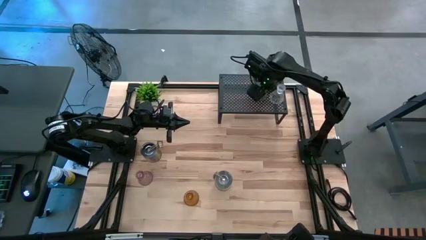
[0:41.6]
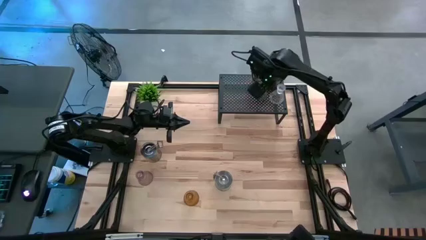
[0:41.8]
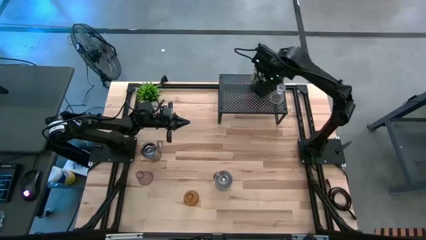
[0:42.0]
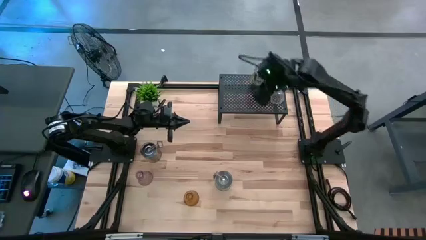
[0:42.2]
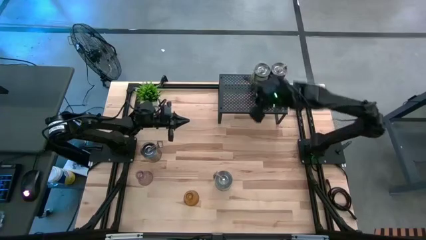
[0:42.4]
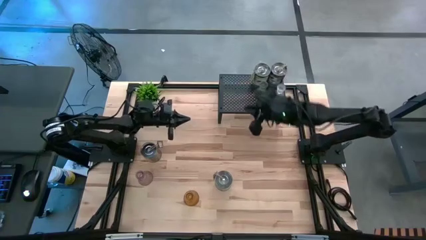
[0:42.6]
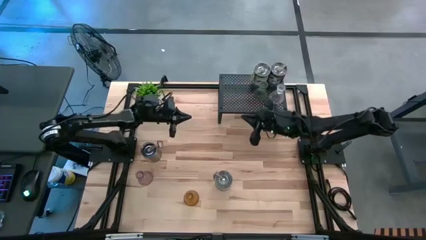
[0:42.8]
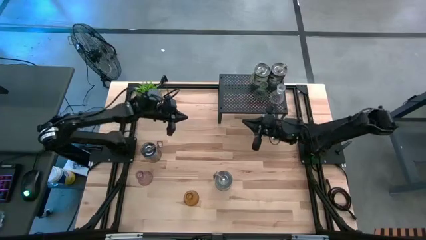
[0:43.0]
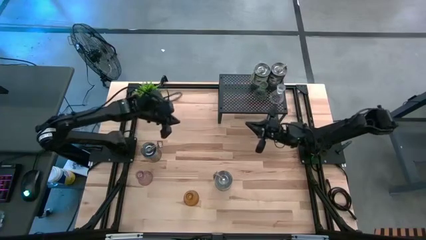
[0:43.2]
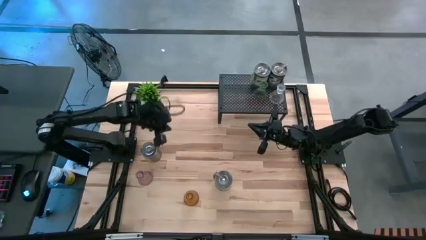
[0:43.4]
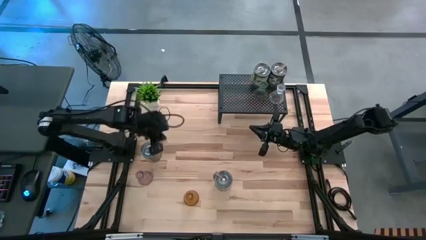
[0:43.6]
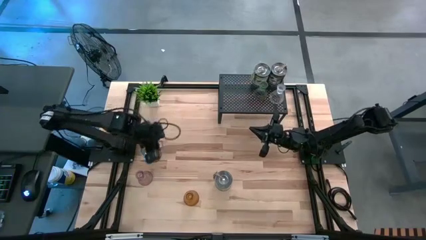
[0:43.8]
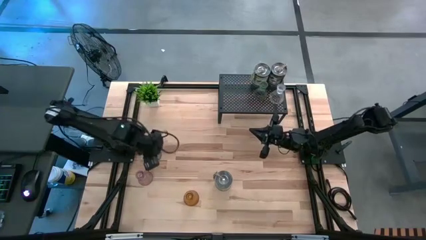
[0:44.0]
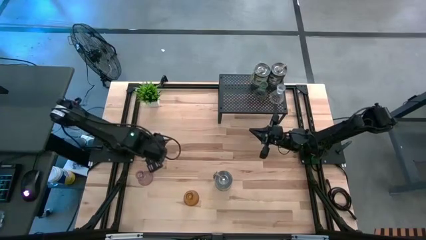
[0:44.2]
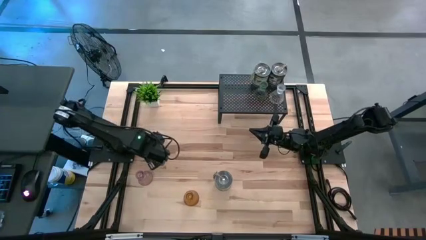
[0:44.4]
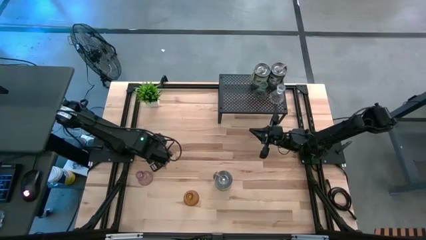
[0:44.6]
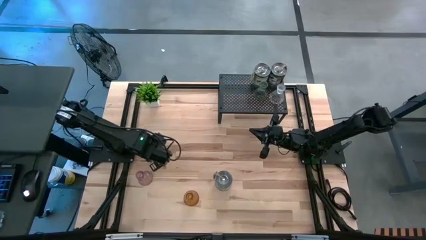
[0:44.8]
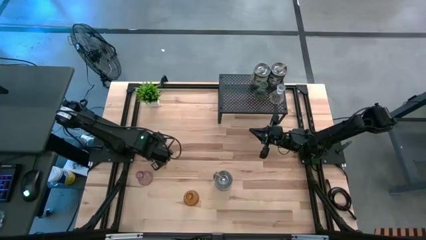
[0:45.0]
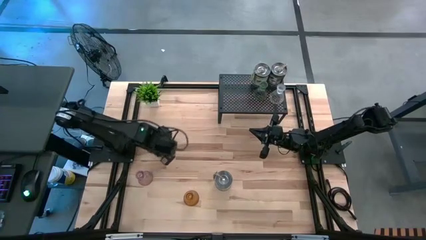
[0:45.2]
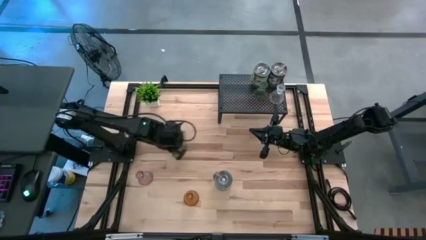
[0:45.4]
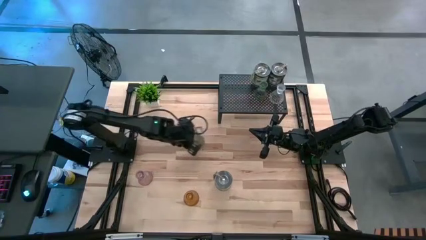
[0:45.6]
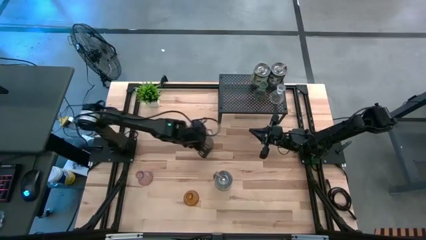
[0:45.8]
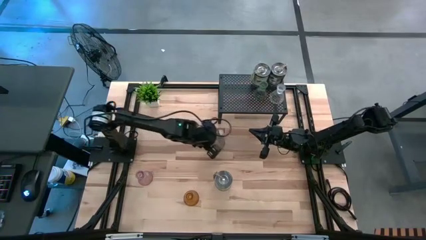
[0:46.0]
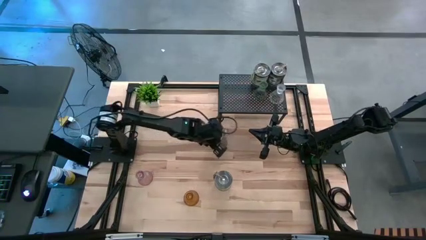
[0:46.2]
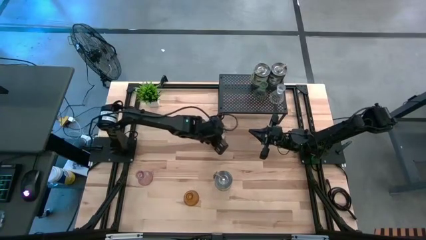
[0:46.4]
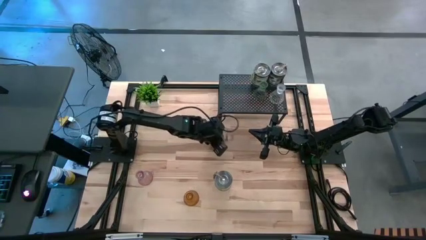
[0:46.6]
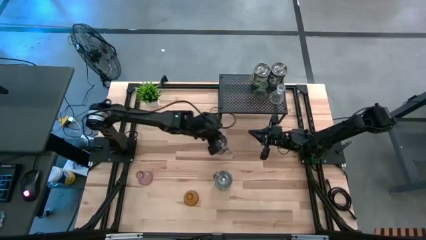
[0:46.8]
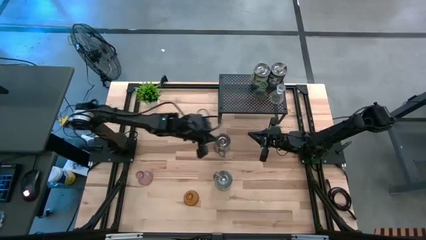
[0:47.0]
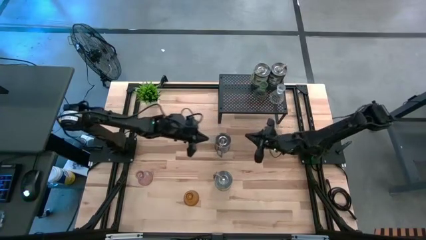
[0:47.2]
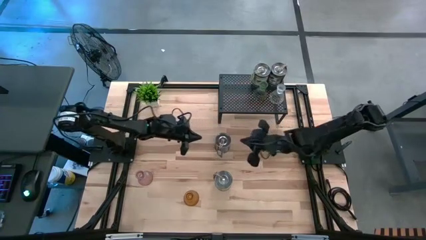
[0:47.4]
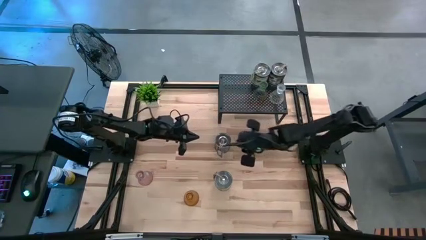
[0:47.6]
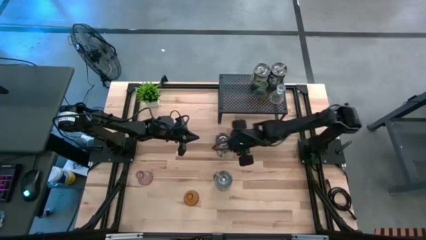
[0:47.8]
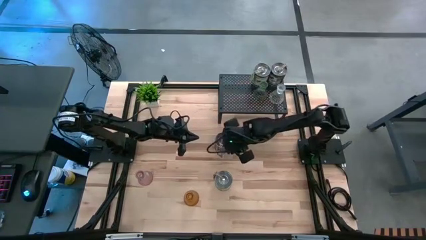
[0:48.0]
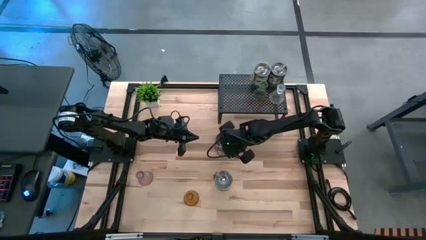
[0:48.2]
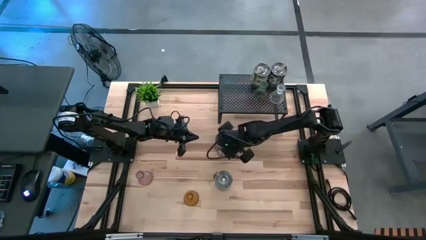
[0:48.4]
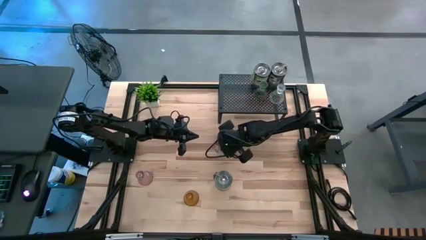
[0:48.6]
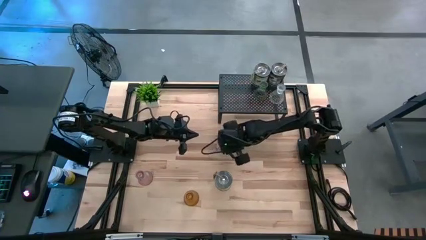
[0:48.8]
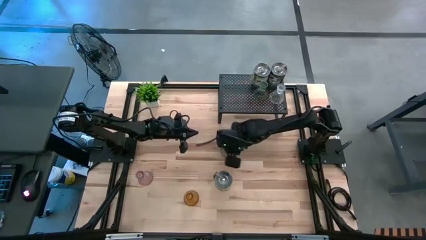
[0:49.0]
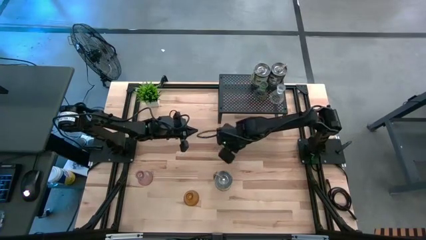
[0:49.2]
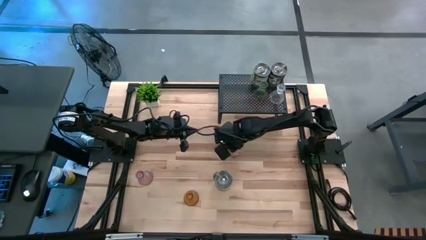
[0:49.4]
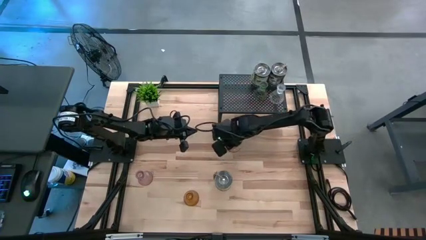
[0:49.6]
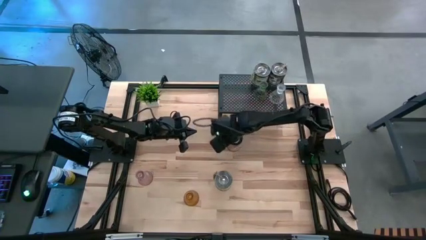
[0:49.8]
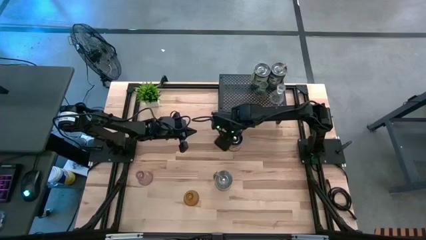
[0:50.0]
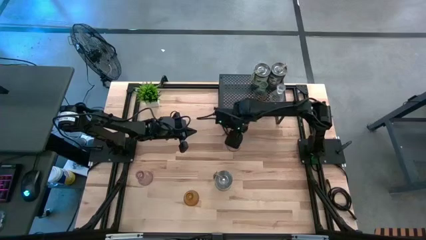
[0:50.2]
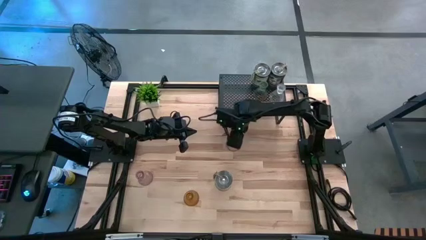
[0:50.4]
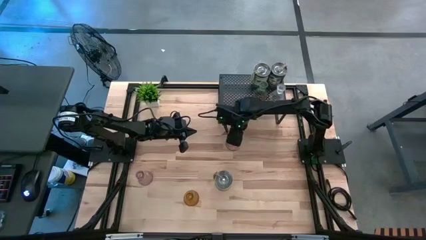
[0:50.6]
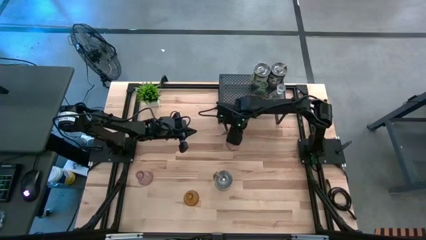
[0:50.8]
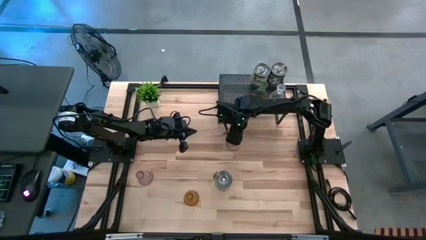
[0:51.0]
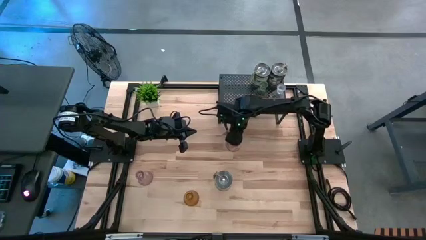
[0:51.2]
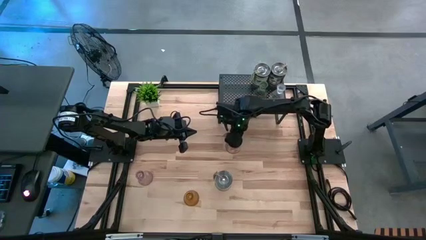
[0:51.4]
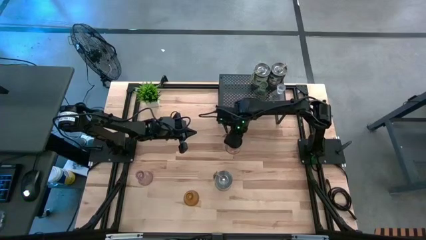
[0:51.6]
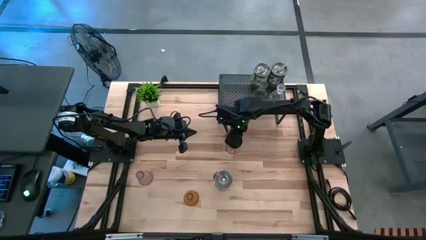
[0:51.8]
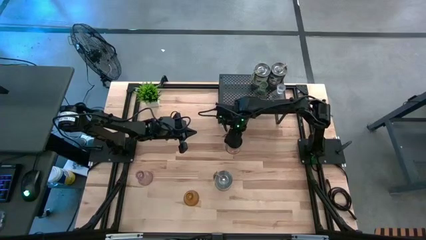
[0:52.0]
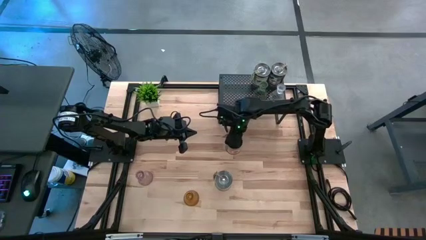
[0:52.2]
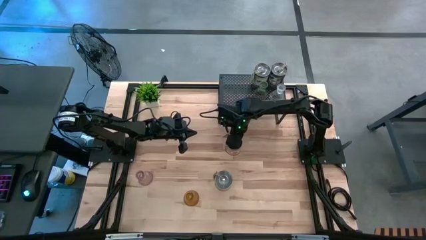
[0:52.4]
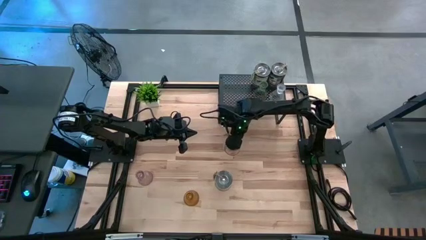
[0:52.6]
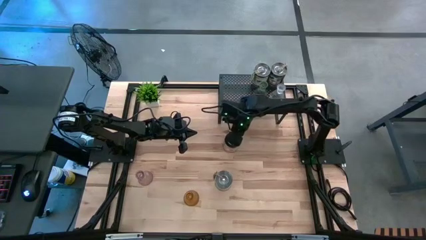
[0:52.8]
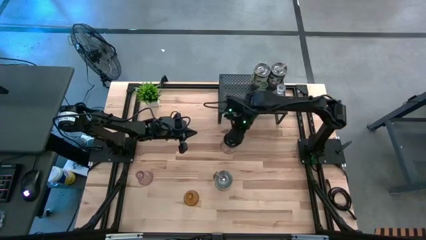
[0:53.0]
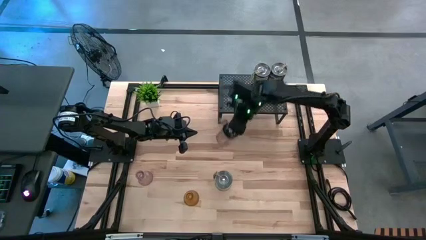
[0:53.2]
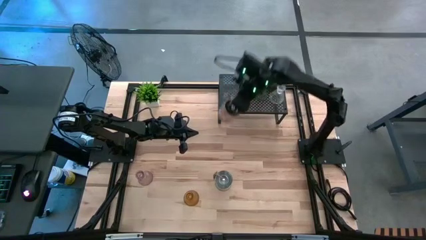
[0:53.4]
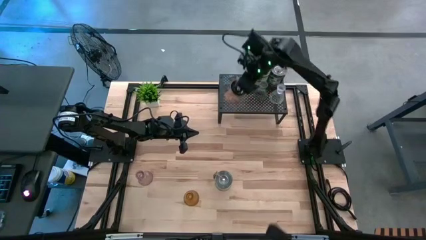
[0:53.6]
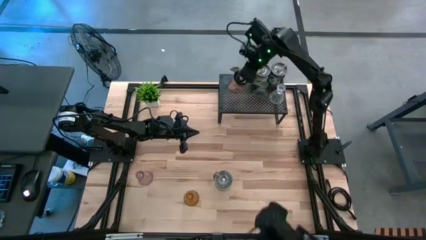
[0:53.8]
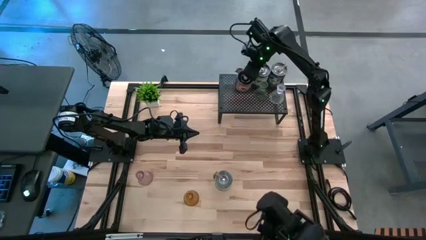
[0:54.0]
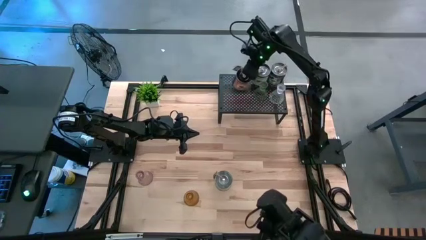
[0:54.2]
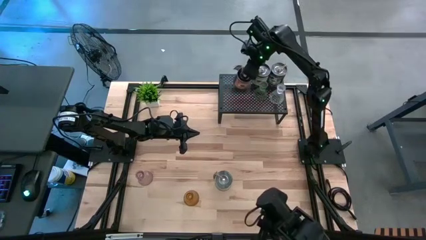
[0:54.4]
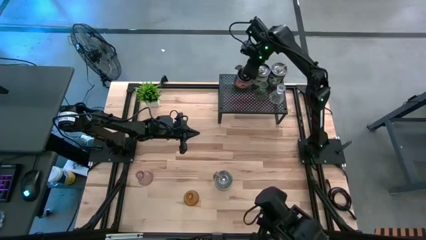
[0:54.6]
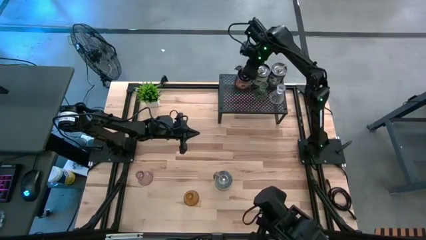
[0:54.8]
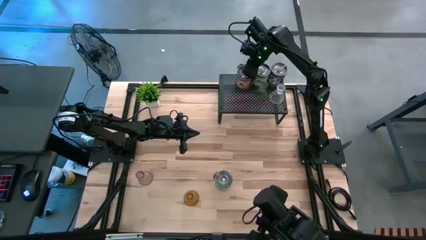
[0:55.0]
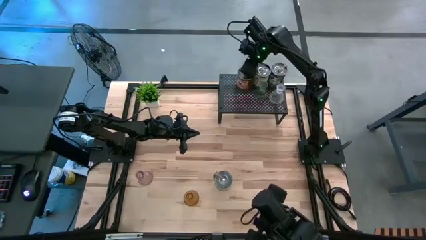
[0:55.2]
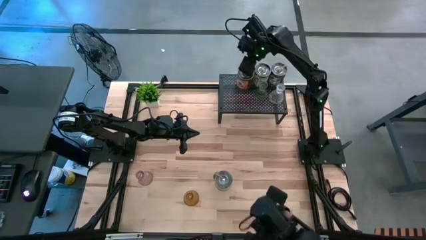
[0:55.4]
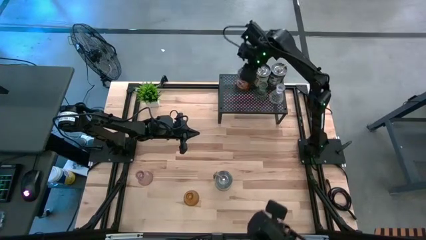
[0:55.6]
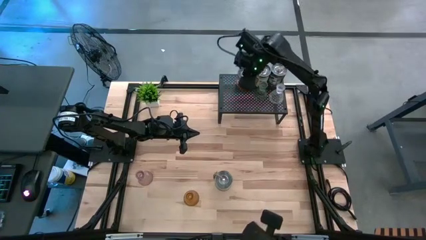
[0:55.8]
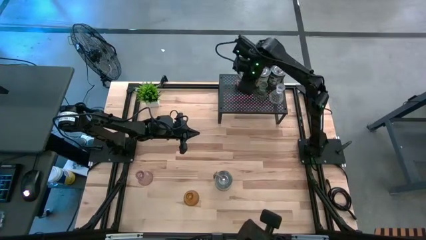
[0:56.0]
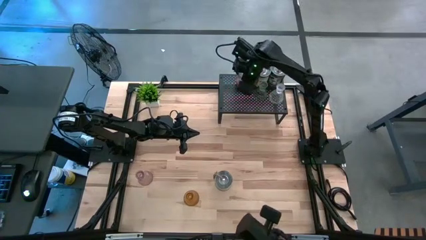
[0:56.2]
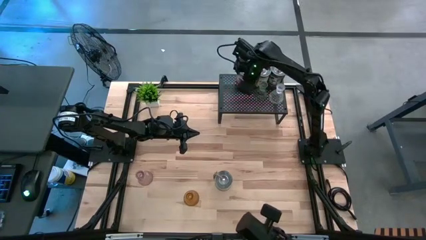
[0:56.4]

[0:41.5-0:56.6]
Task: Pick & Place candle stick holders
Align the silver scented candle with the other silver scented candles on the shelf

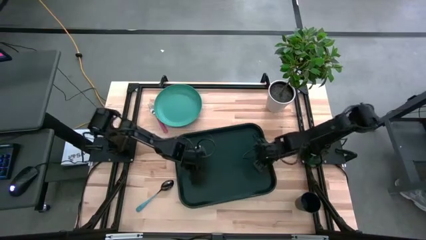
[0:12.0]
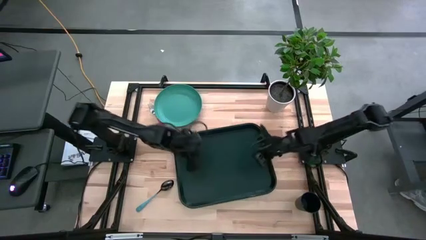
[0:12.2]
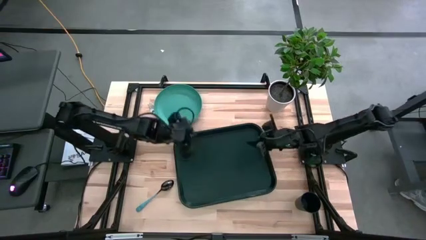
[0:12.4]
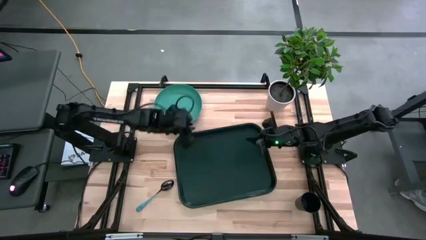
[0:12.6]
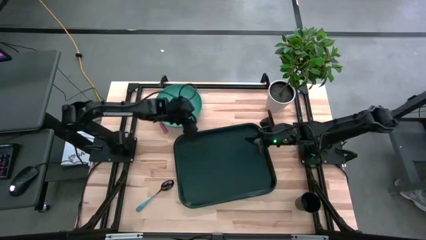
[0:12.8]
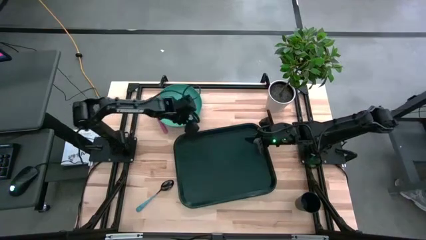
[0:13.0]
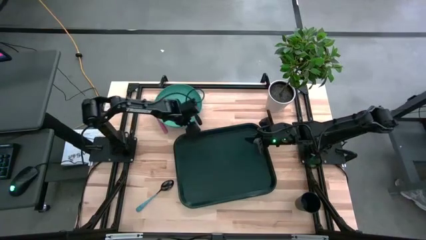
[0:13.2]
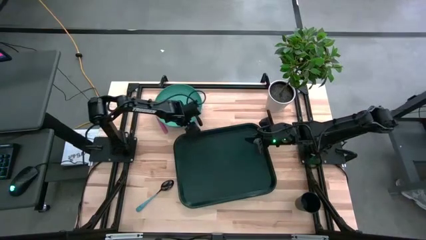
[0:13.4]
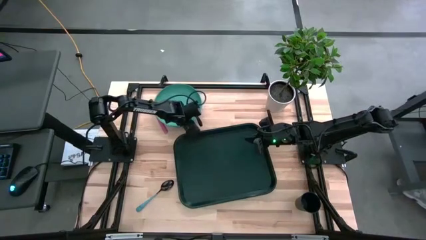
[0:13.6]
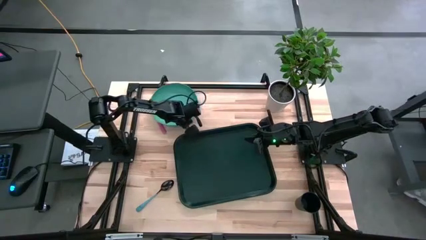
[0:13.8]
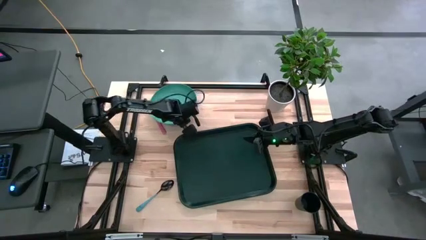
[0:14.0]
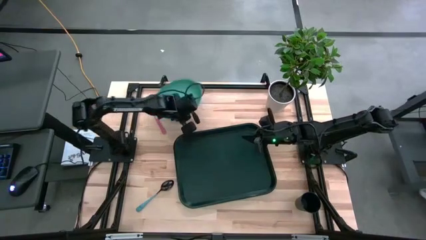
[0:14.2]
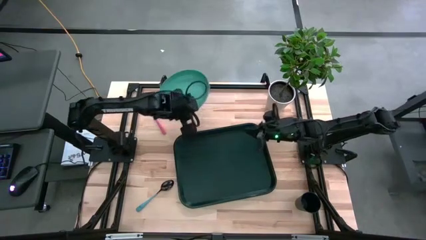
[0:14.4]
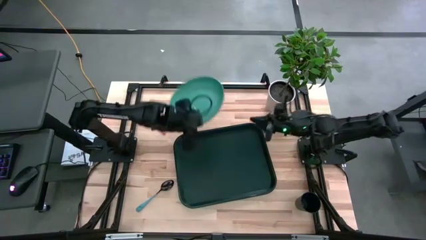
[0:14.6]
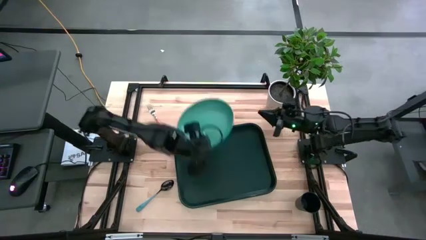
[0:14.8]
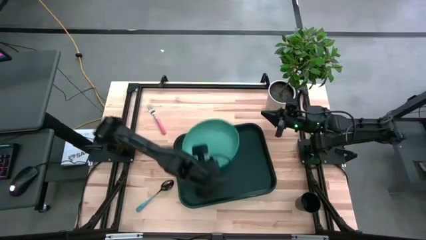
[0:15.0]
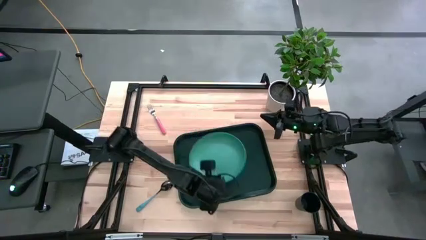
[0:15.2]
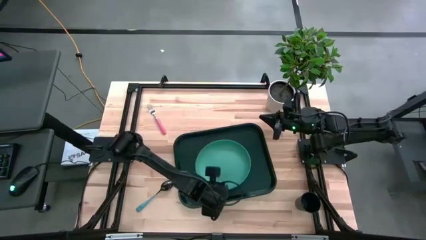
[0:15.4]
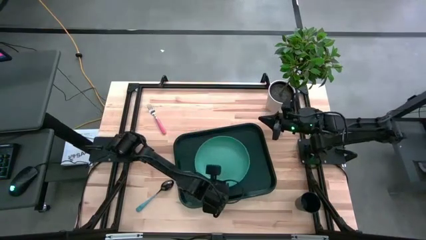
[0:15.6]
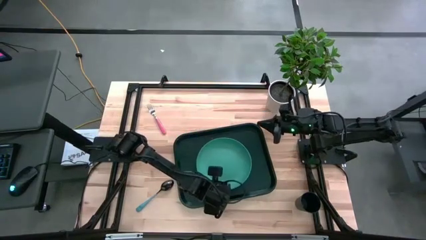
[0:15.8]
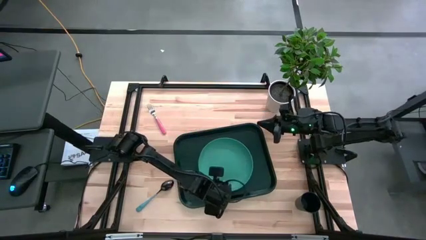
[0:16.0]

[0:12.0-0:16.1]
Task: Pick and place plate/cup/fork/spoon on tray
Put the green plate on the black serving tray
